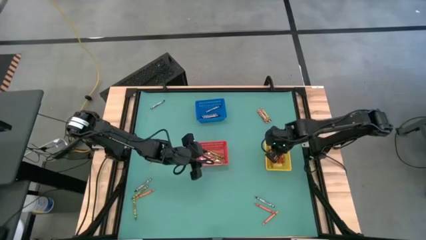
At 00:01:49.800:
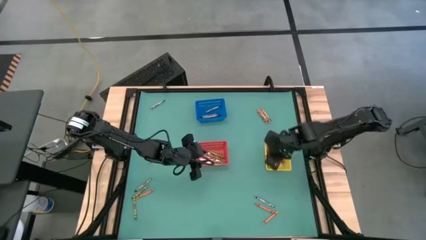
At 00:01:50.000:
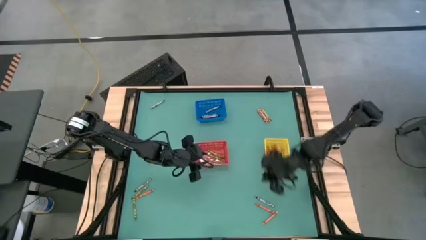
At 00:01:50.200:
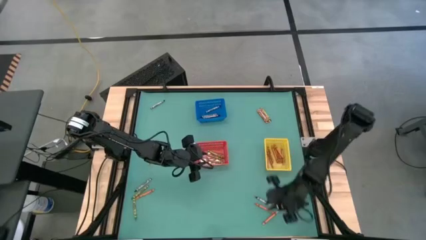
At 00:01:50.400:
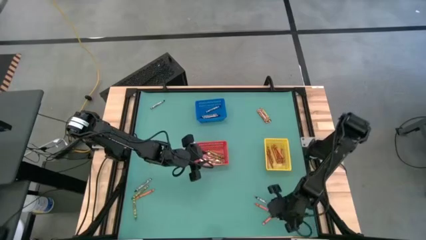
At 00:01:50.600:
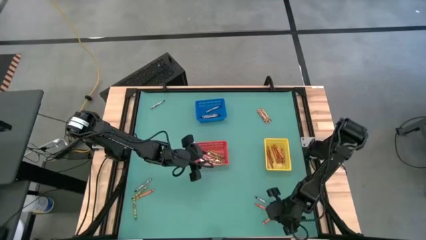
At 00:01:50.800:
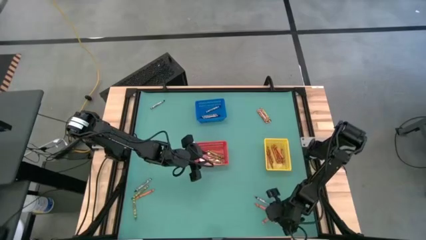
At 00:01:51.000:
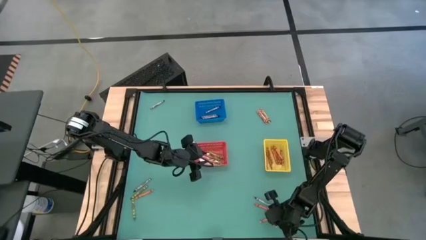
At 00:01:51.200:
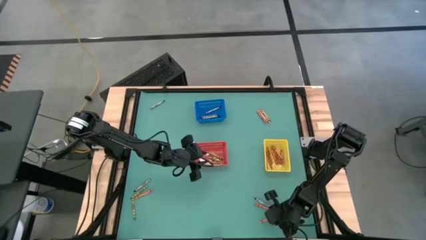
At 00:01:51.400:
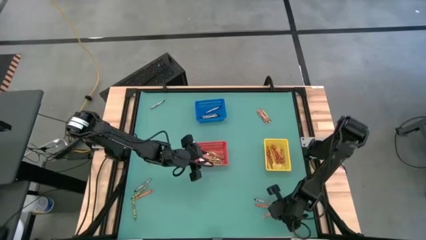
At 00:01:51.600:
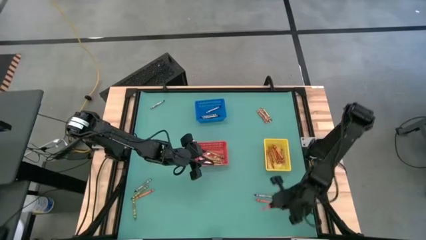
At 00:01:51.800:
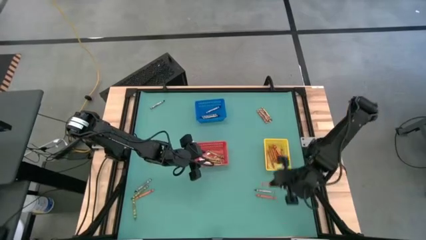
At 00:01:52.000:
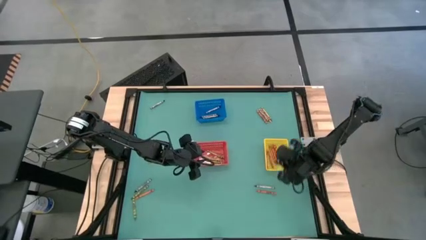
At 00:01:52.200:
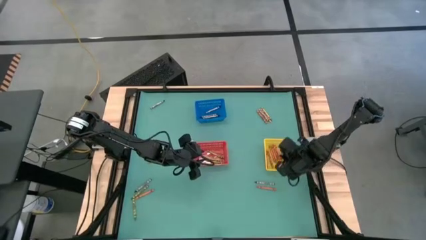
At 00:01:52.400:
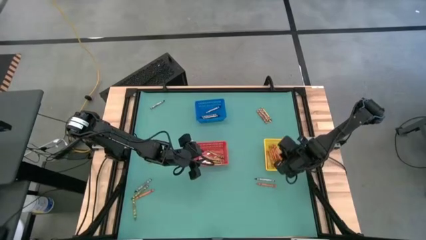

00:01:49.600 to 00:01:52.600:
Task: Sort crayons
Put the orange crayon into the yellow bin

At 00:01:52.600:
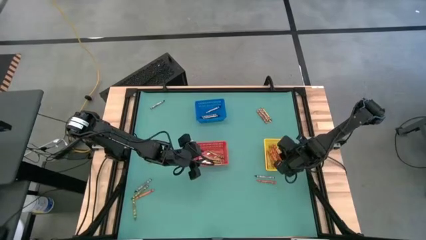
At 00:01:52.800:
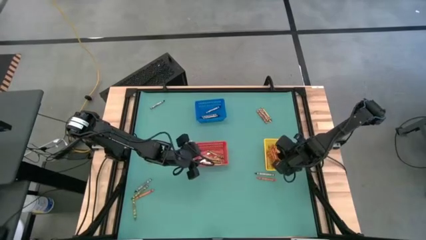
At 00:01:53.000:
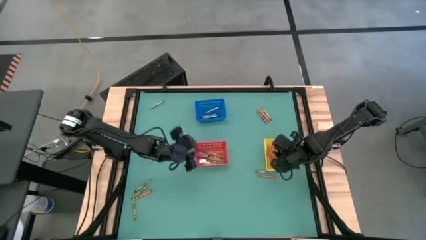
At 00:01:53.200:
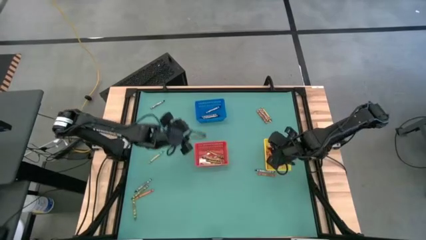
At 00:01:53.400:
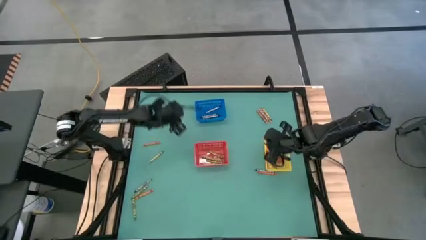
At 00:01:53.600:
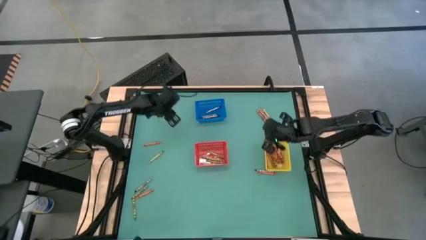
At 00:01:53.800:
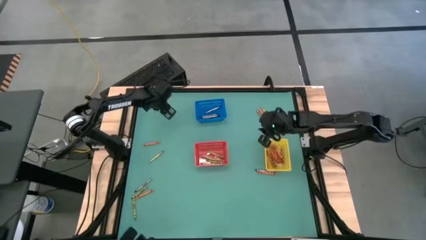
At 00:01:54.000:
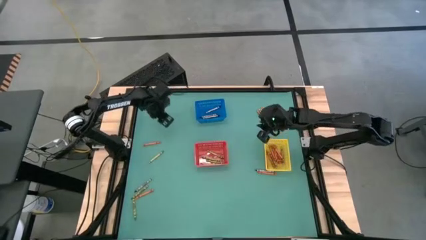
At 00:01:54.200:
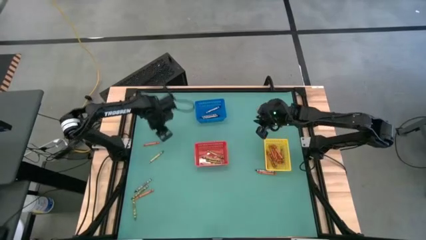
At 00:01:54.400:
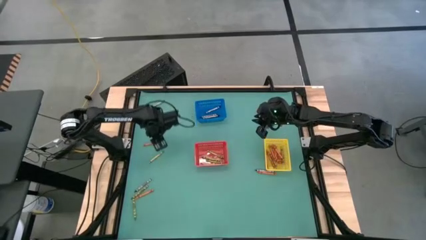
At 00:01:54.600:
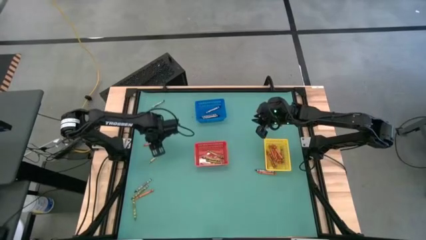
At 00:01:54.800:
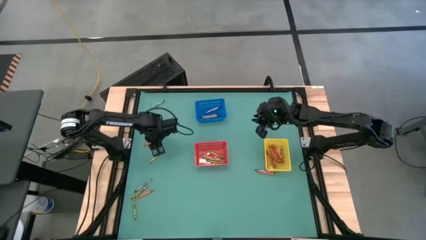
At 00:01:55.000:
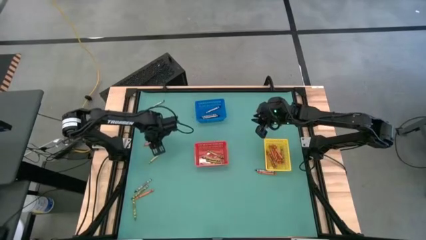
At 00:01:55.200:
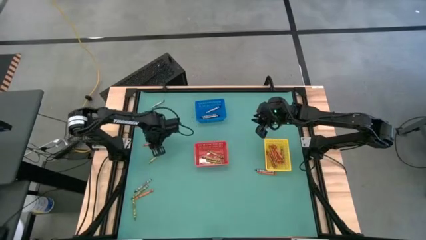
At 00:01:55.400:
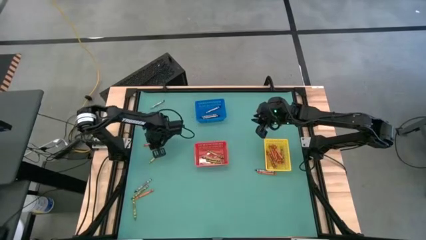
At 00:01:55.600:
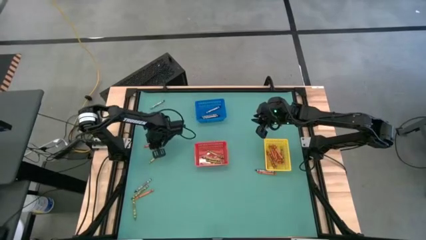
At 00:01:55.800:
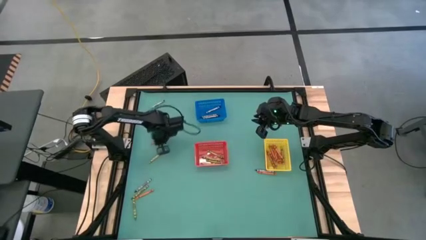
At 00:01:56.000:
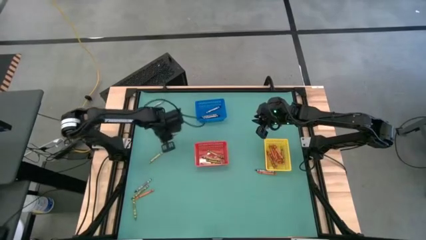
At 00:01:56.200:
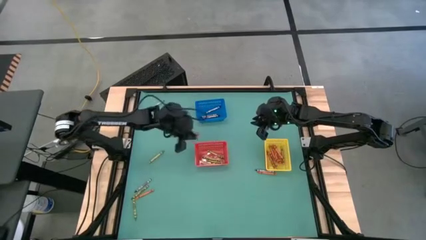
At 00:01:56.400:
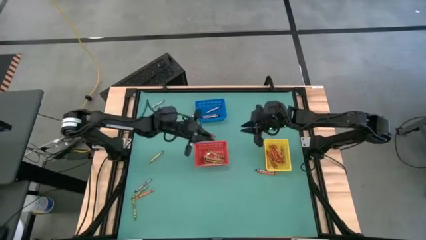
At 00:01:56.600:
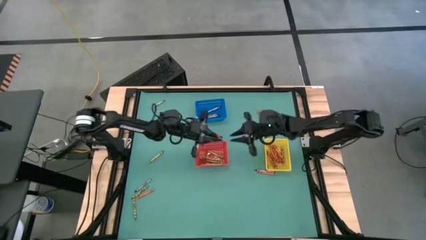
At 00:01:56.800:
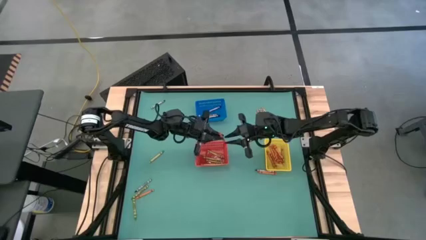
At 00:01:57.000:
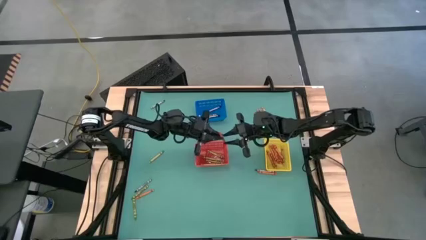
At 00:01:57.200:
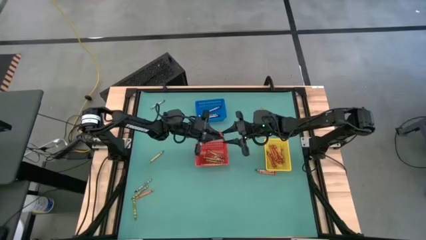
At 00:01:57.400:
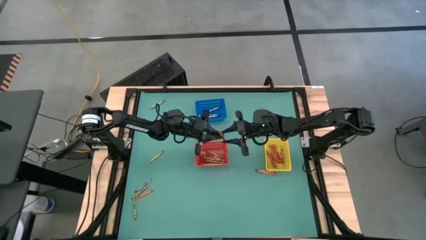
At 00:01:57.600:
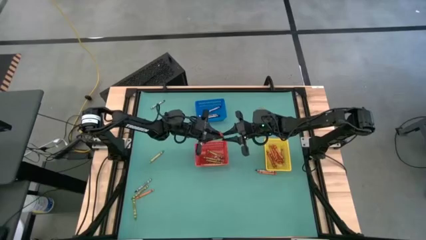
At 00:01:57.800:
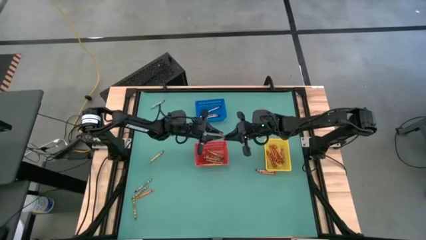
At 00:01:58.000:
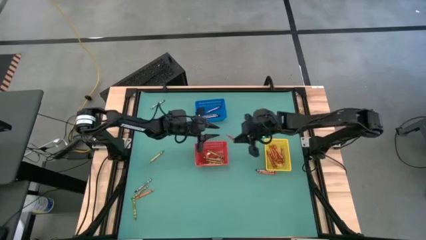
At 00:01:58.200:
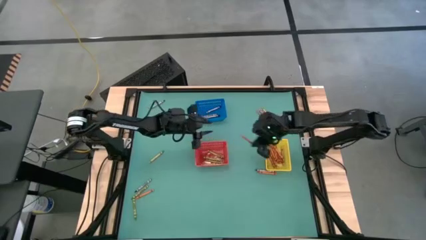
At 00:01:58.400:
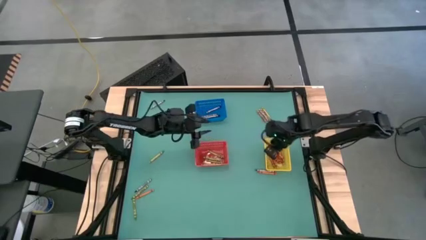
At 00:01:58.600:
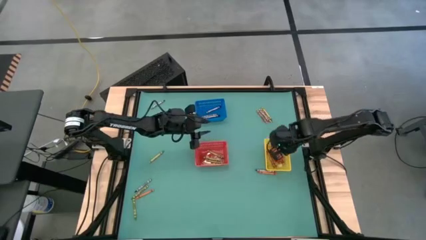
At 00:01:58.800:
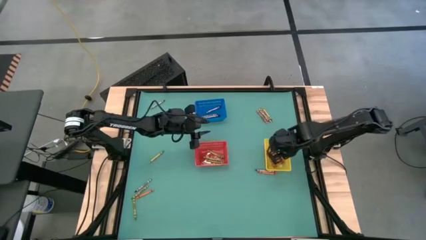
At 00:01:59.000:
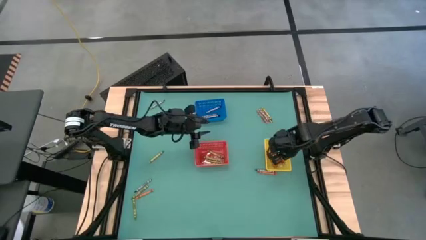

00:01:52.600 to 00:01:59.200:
Put the orange crayon into the yellow bin

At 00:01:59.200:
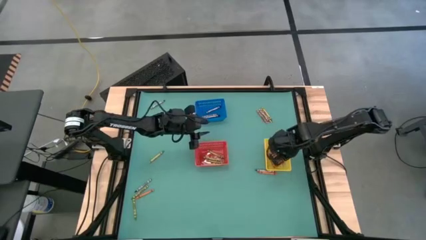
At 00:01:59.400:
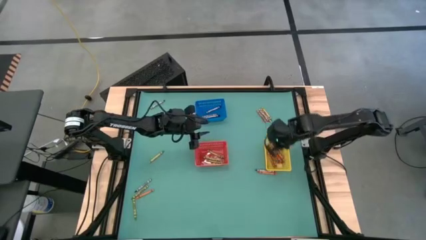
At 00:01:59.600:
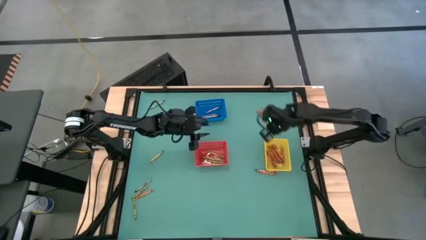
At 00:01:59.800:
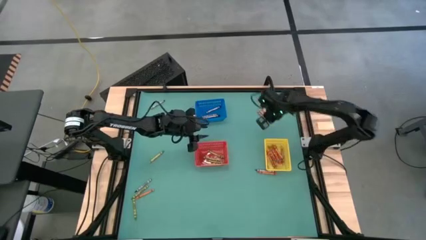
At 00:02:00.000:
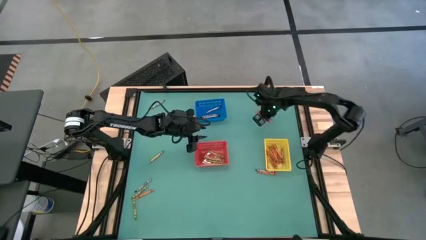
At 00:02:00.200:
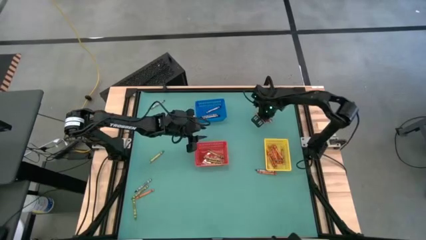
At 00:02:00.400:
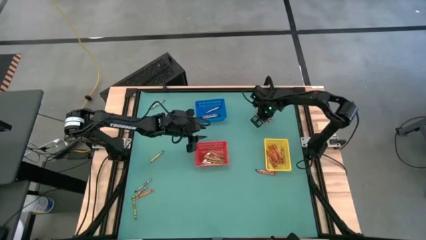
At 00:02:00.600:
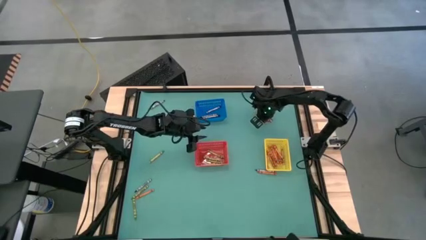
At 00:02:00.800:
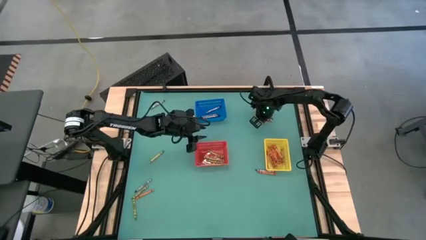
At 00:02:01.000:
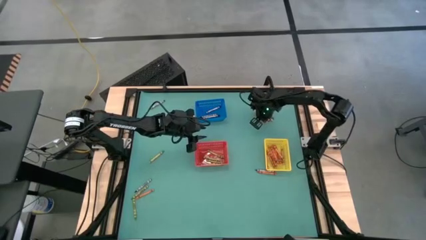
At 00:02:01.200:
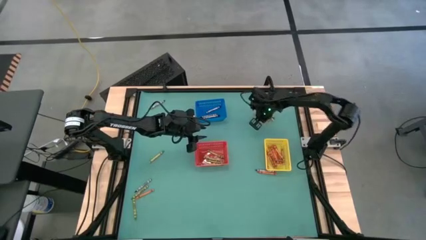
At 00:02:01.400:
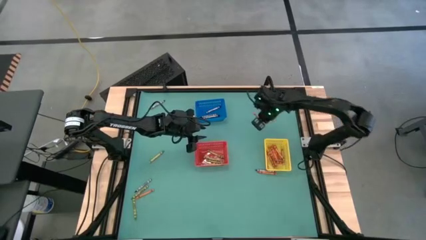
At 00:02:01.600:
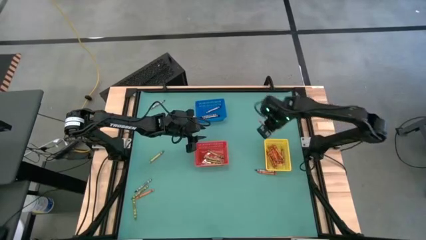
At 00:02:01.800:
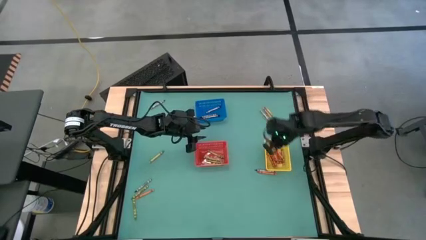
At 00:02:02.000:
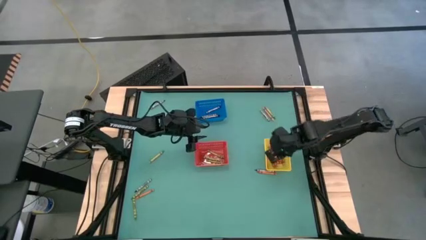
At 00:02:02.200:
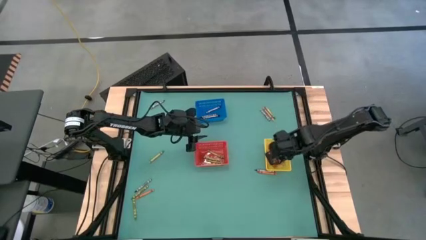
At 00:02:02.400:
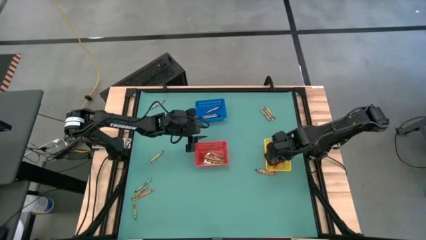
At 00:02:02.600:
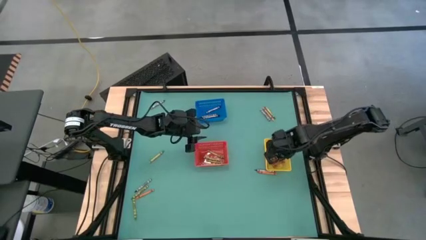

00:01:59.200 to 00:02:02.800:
Put the orange crayon into the yellow bin

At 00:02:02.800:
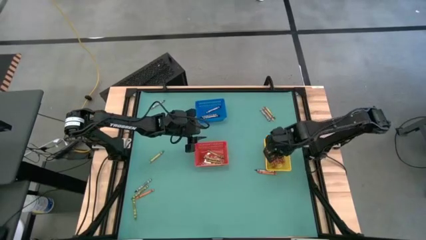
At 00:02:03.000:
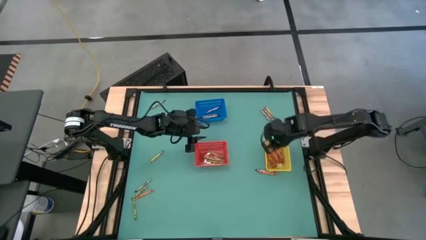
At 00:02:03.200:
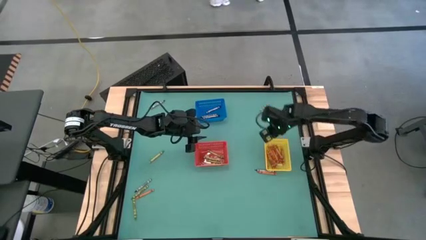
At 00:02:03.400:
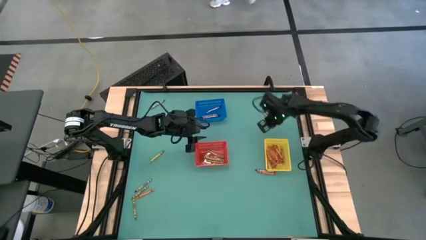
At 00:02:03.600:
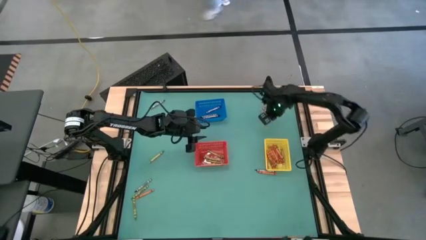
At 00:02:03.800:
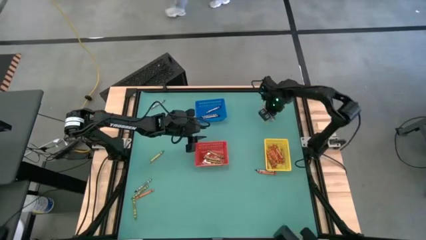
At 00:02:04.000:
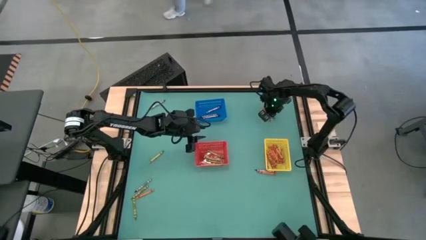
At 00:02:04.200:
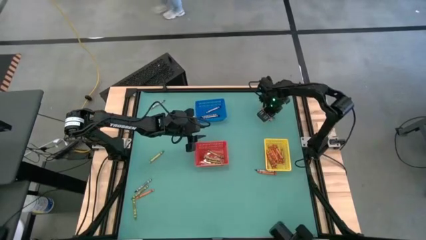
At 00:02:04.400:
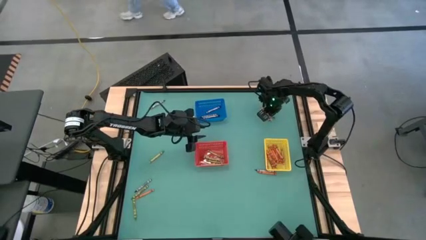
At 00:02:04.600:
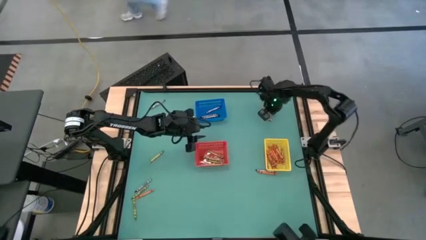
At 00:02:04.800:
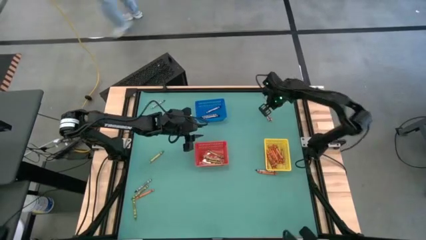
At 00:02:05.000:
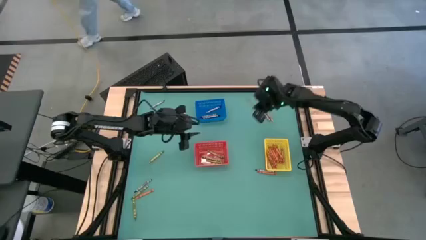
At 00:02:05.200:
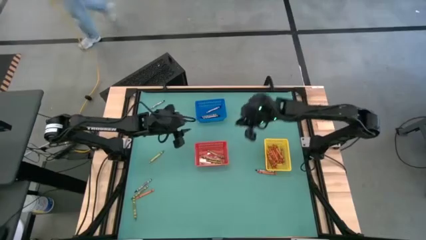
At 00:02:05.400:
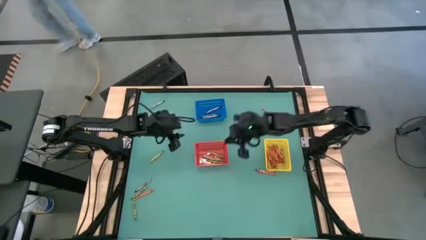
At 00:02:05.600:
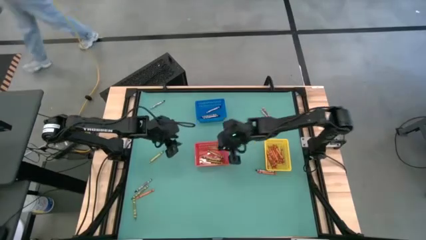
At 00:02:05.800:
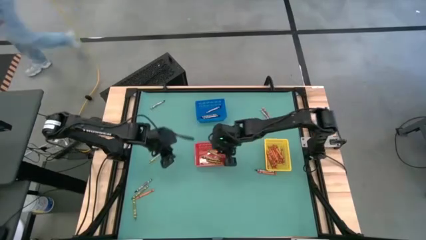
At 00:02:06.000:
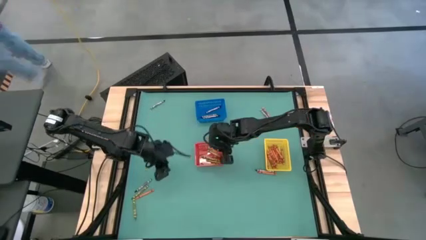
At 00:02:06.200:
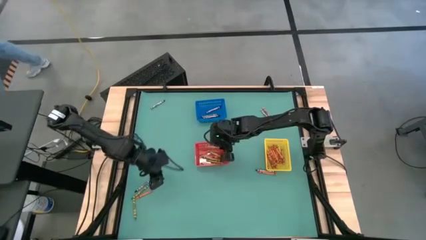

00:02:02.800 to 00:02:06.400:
Put the green crayon into the red bin
